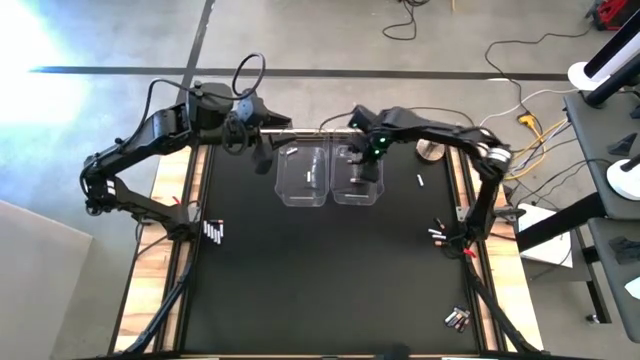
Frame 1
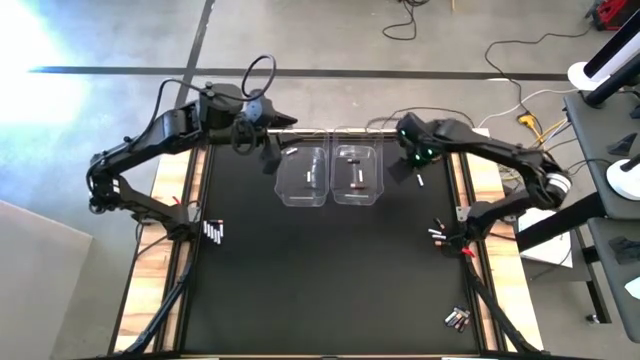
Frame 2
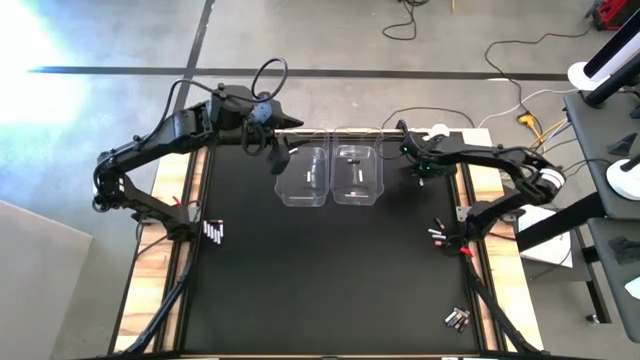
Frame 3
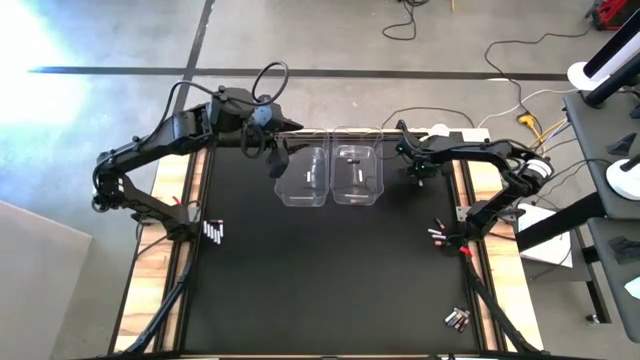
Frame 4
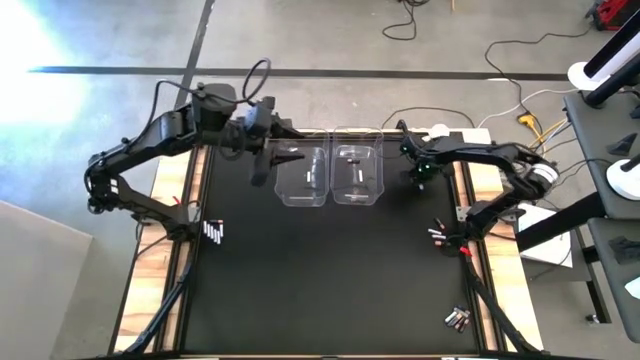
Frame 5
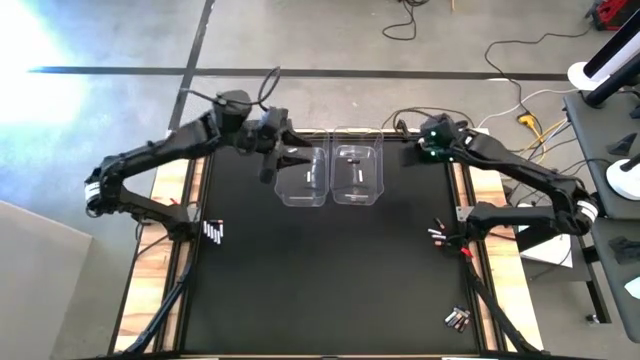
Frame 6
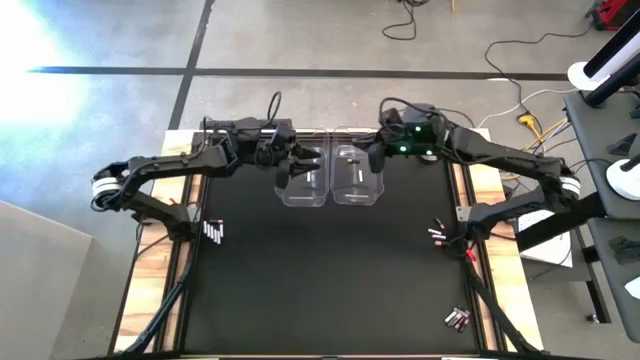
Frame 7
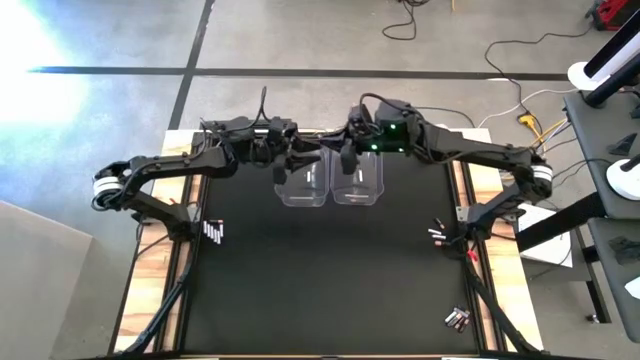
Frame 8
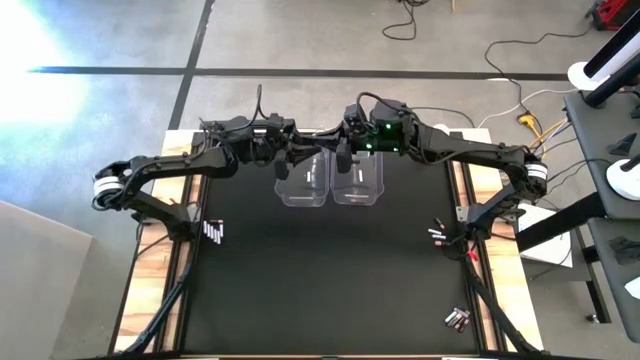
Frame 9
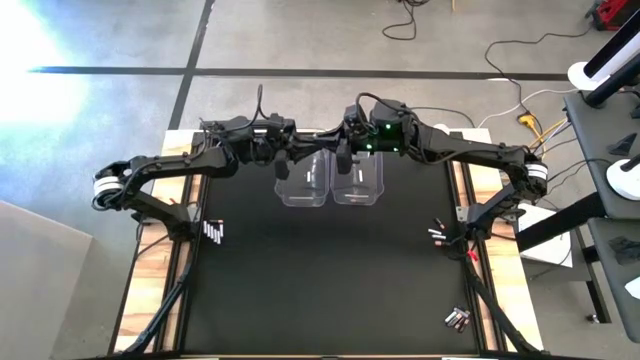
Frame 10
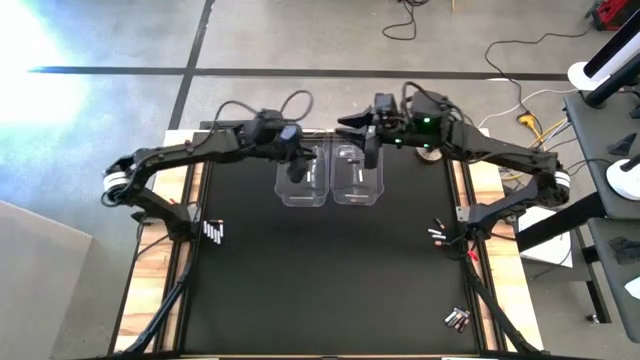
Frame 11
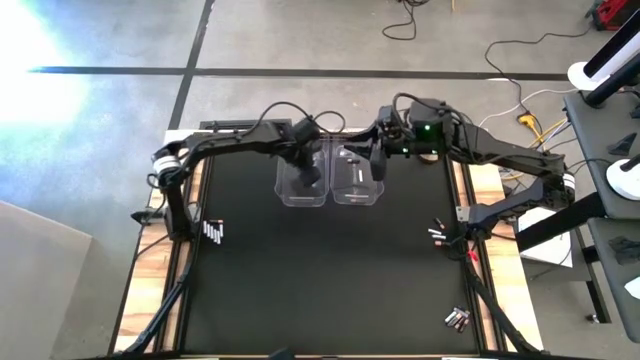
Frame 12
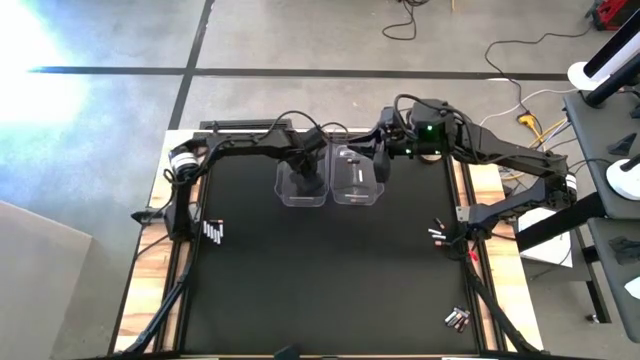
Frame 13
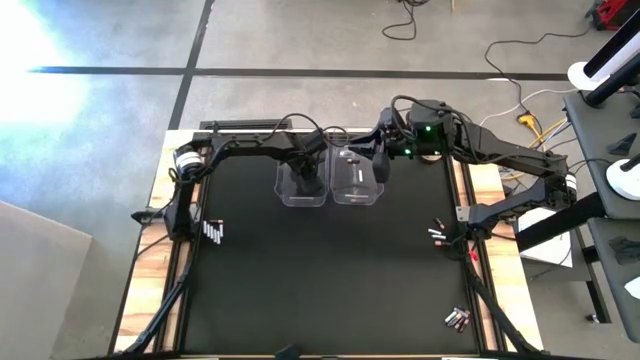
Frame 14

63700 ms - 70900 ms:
Task: Sort batteries
Put the white battery into the left transparent bin

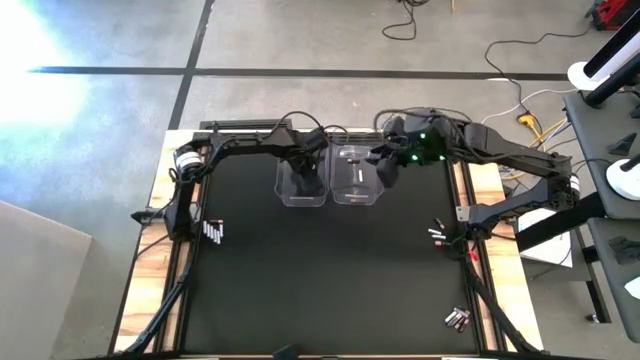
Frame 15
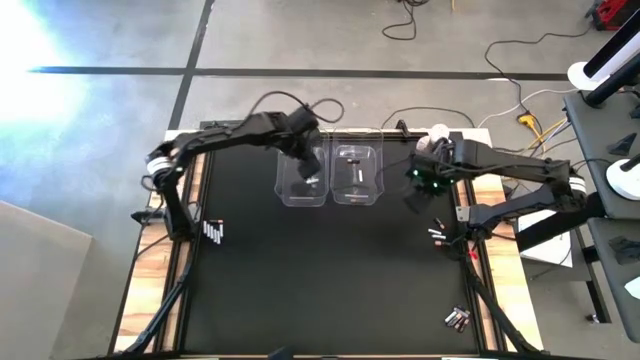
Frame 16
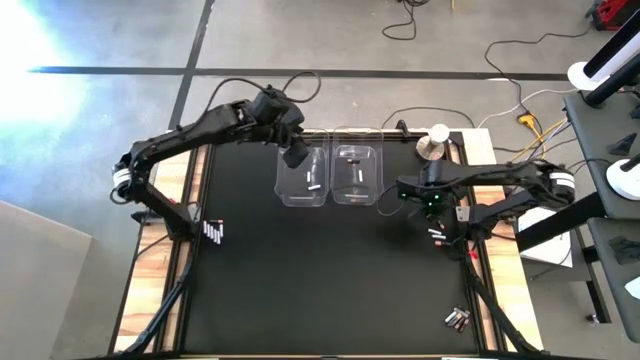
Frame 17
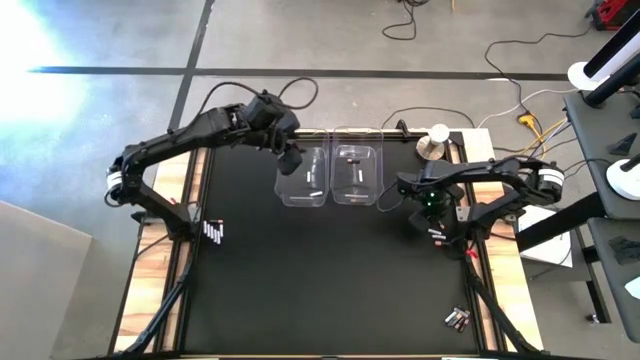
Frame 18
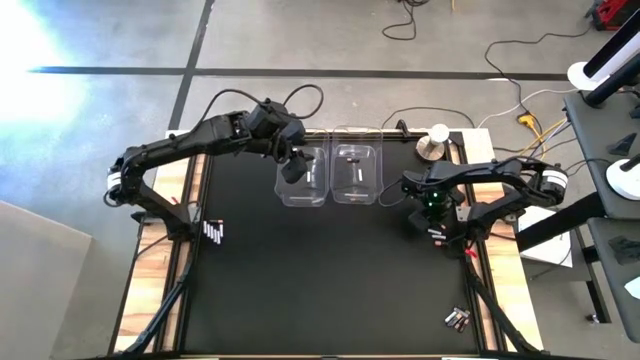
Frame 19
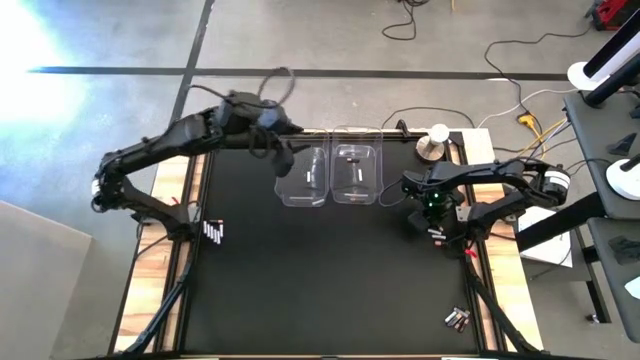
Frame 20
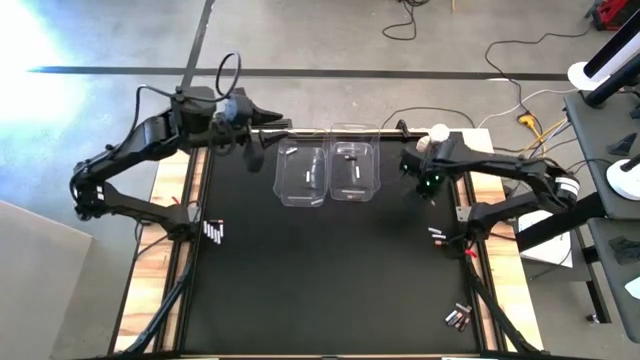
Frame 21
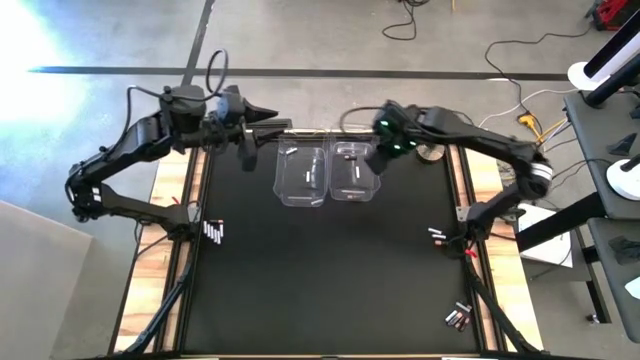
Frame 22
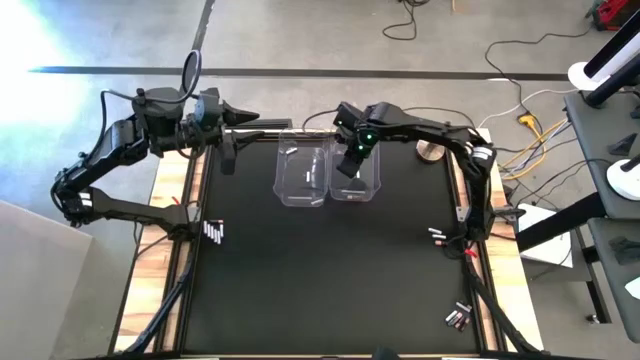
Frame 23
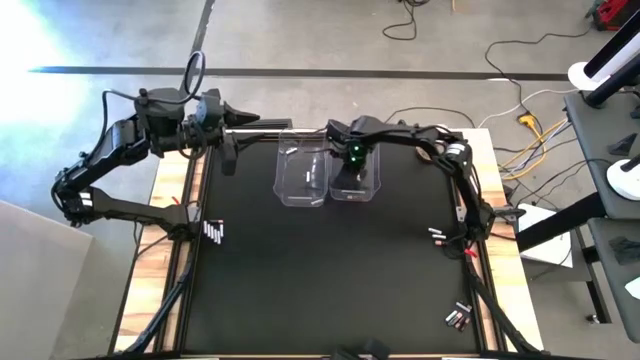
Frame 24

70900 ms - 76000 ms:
Put the black battery into the right transparent bin

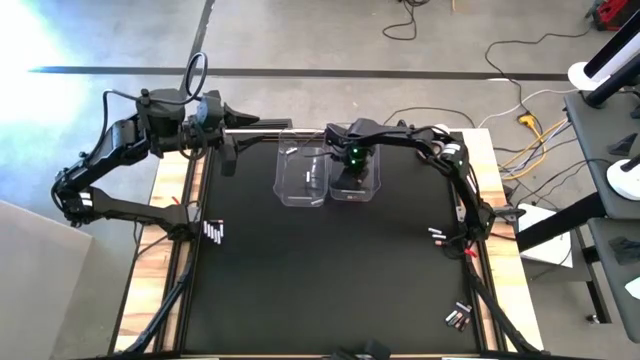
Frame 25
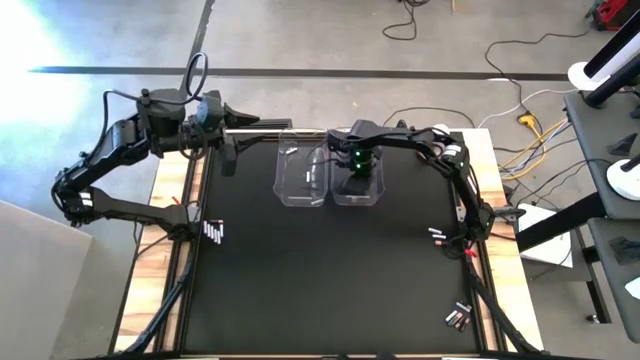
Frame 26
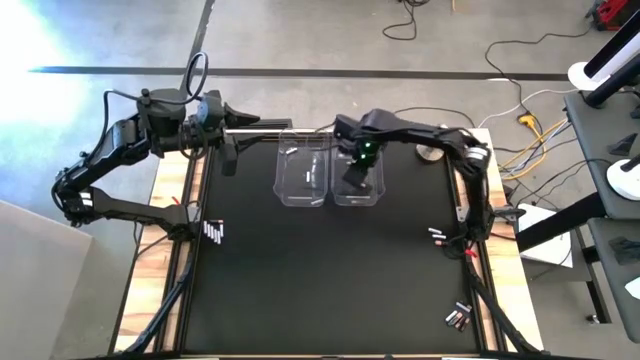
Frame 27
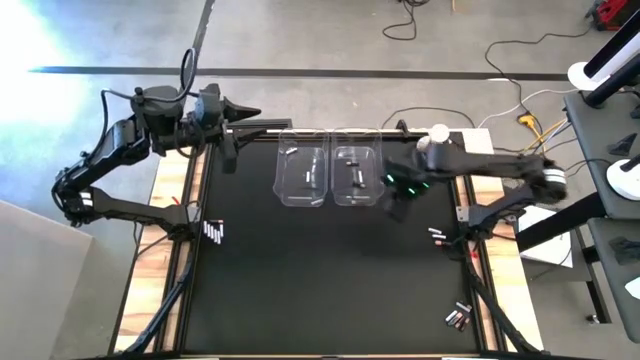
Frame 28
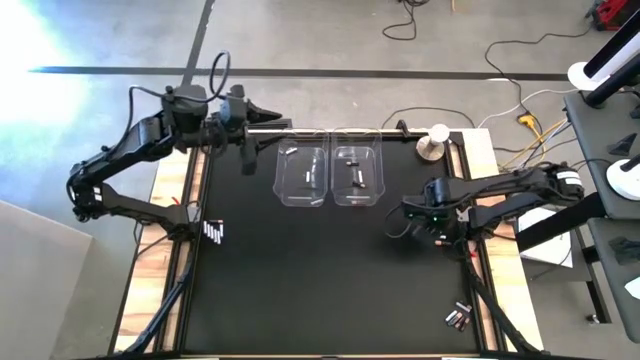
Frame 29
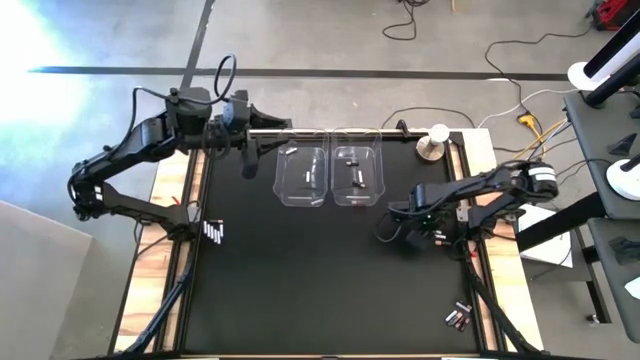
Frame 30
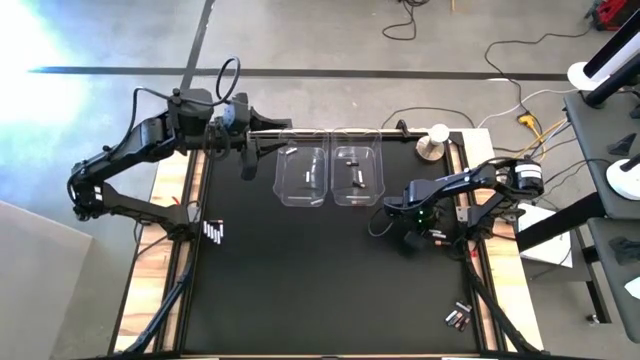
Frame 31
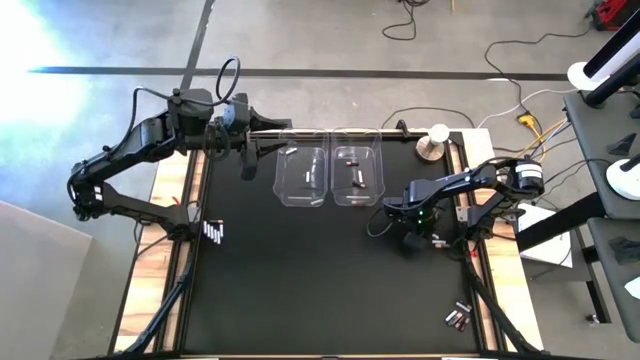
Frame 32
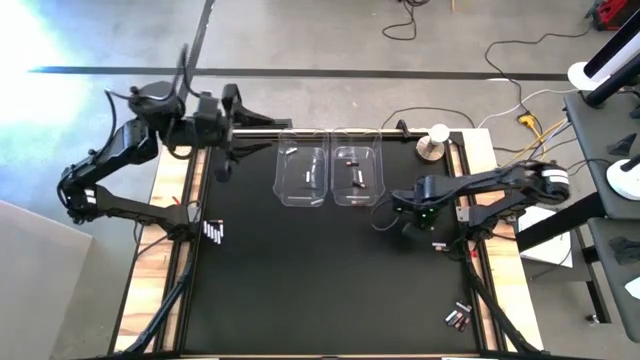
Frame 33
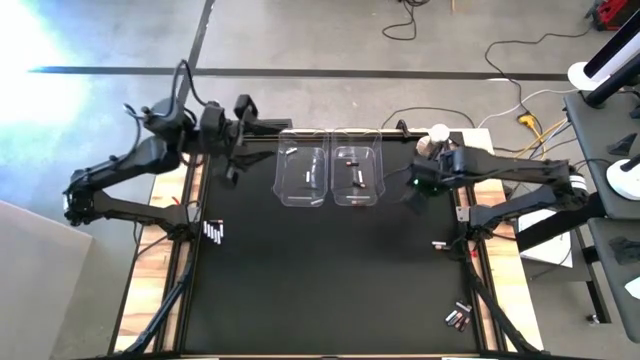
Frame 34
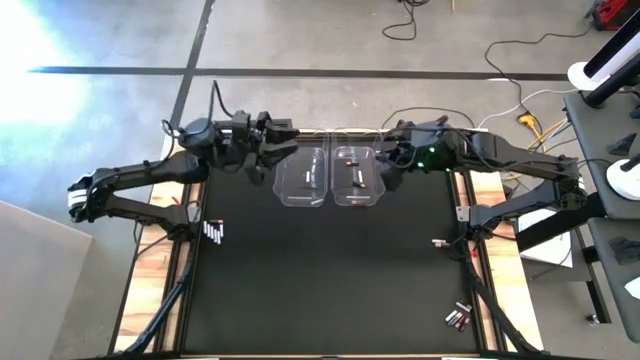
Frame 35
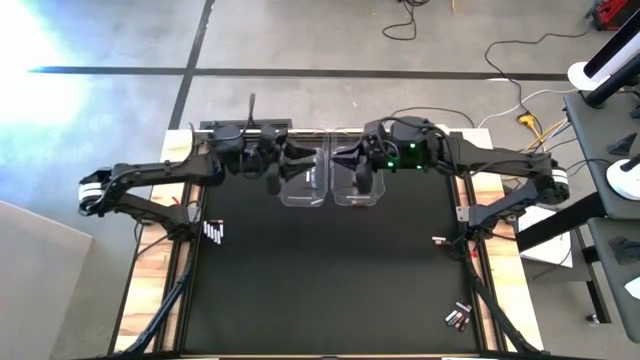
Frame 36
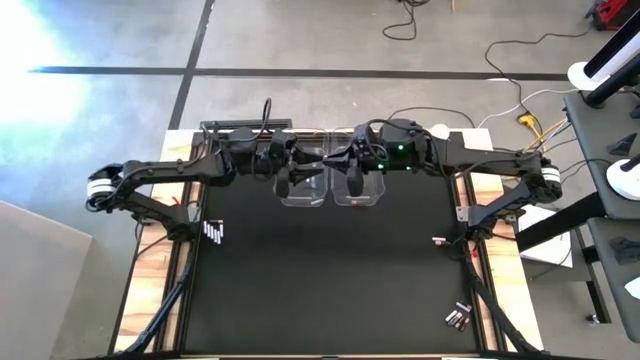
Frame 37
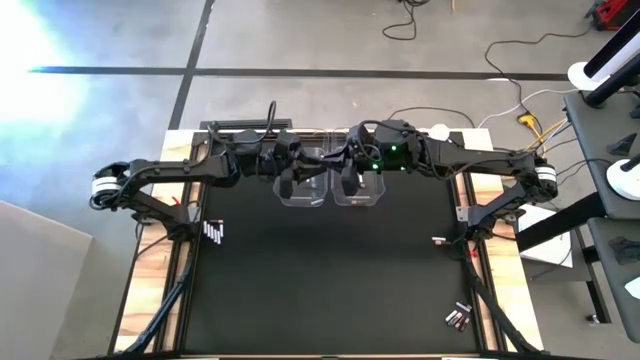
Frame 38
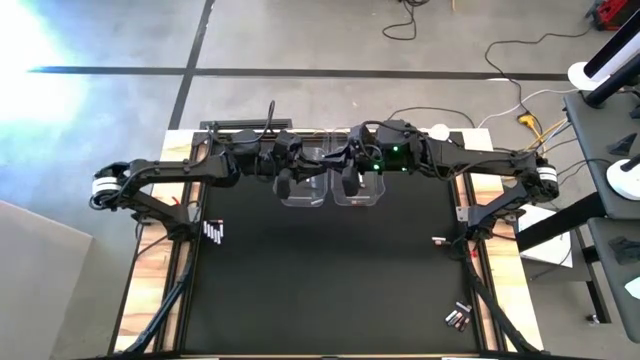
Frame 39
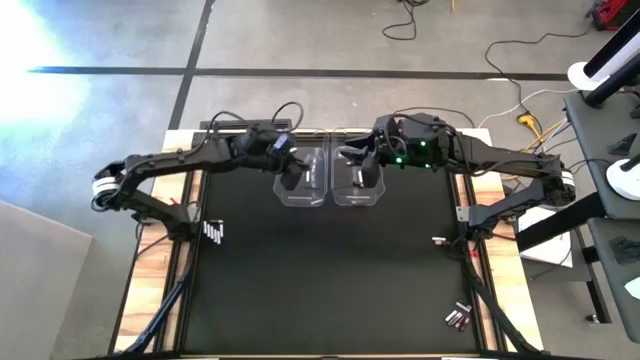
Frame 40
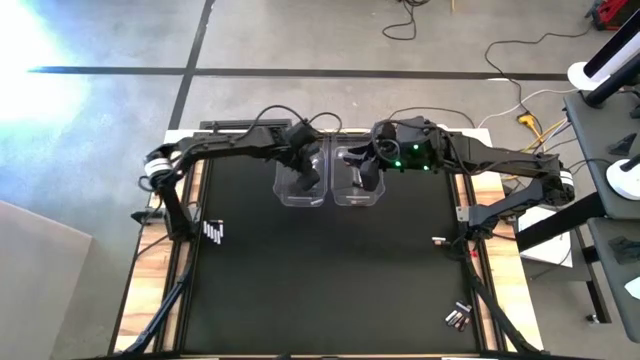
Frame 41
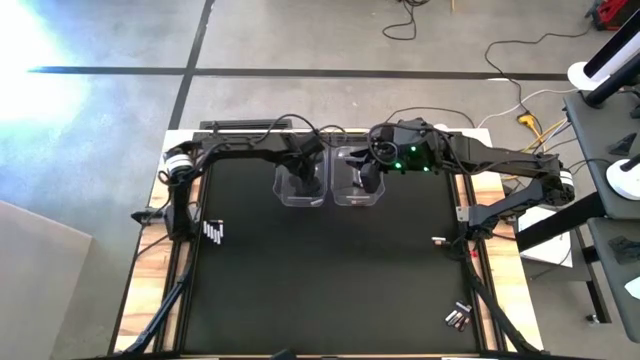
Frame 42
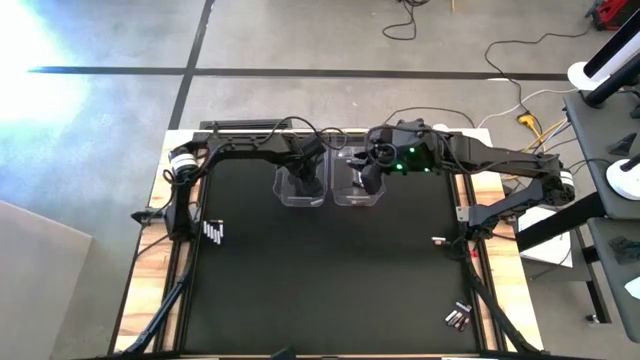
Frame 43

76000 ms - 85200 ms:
Put the white battery into the left transparent bin

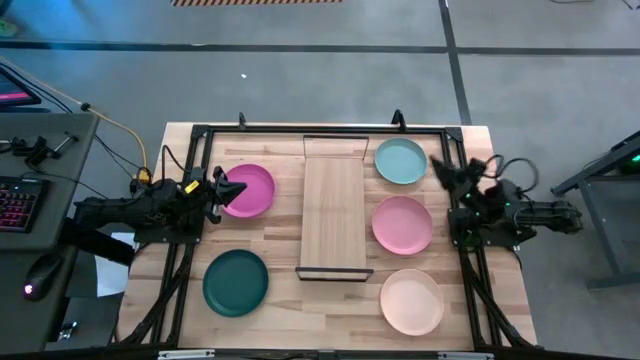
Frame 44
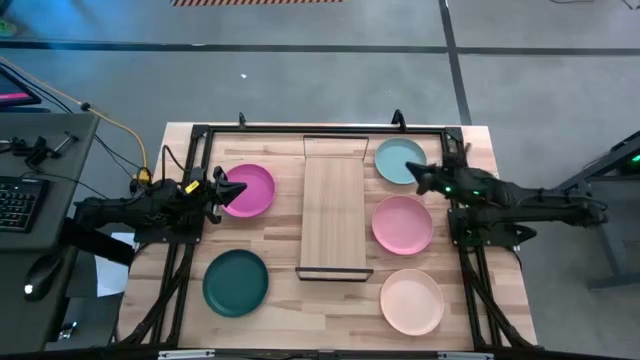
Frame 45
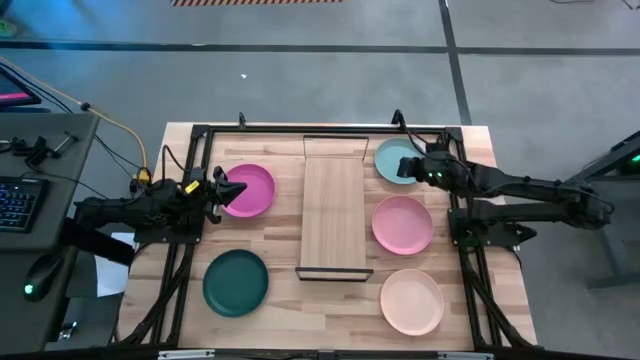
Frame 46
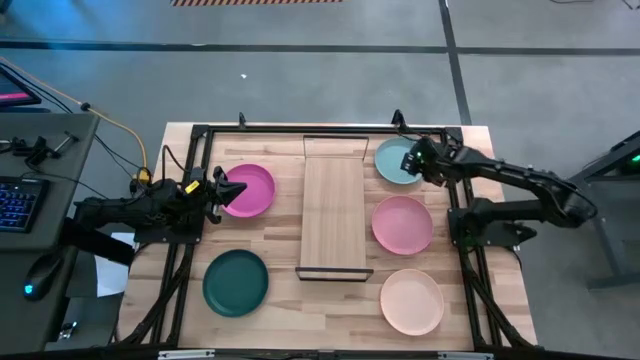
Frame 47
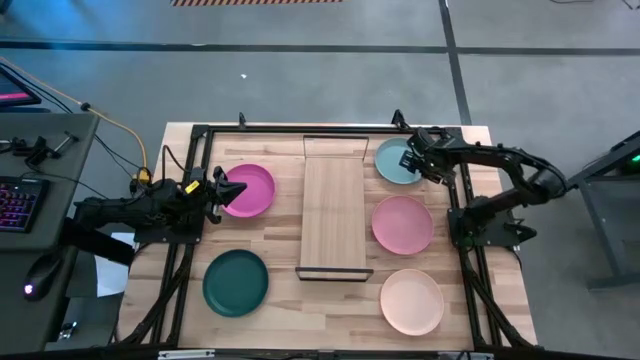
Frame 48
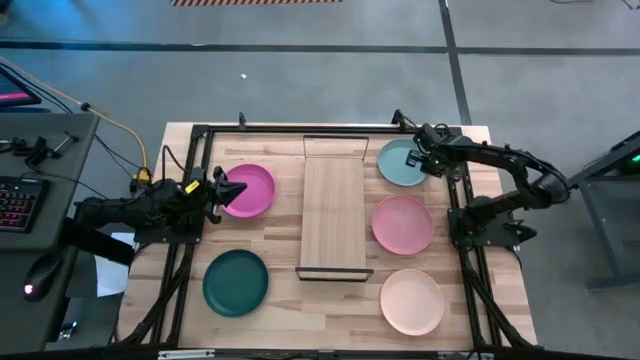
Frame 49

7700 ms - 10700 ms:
Task: Place and stack plates onto a shelf
Put the blue plate on the shelf
